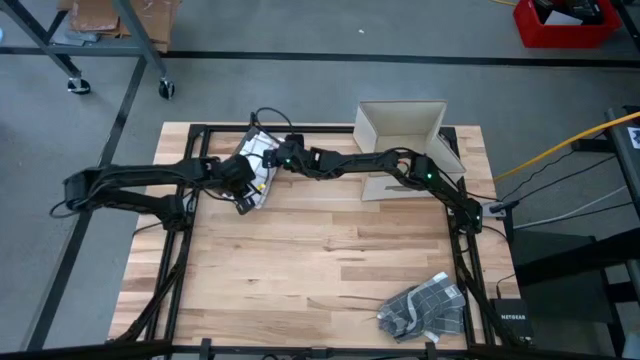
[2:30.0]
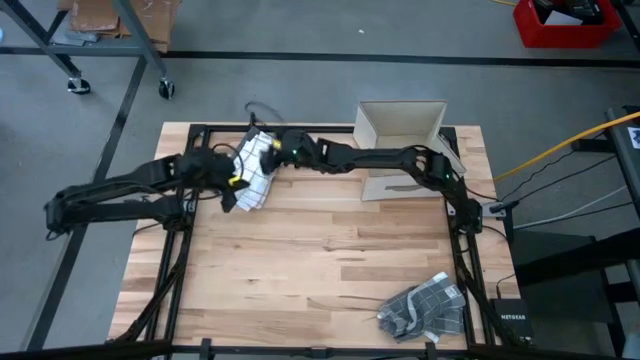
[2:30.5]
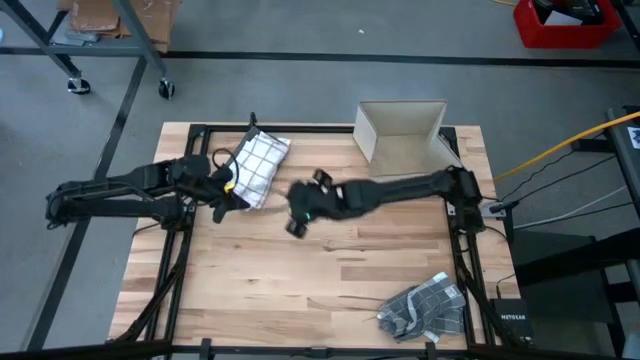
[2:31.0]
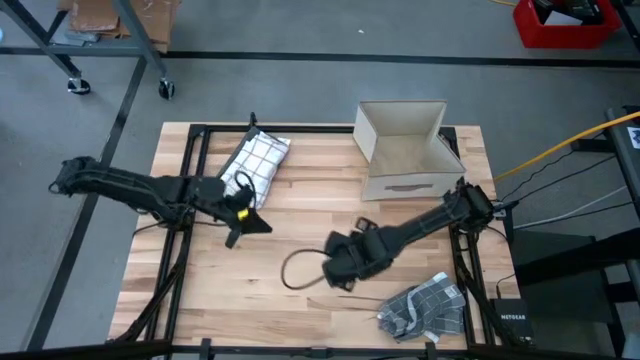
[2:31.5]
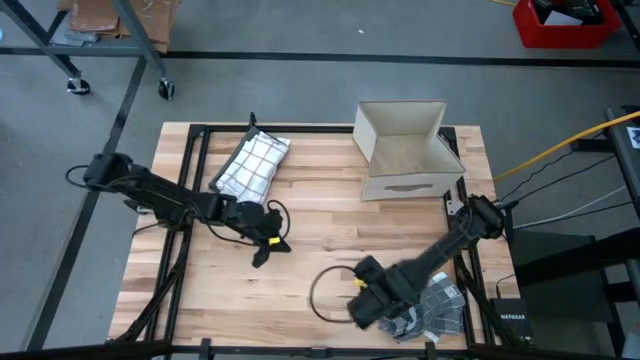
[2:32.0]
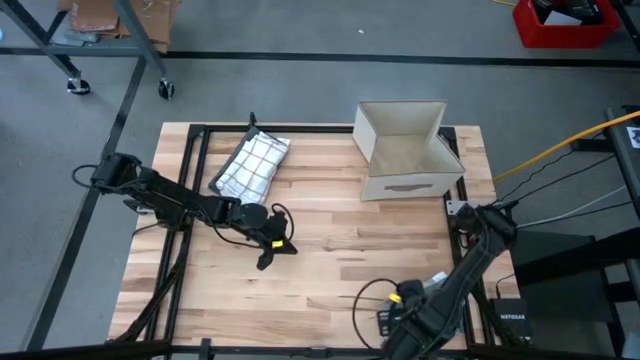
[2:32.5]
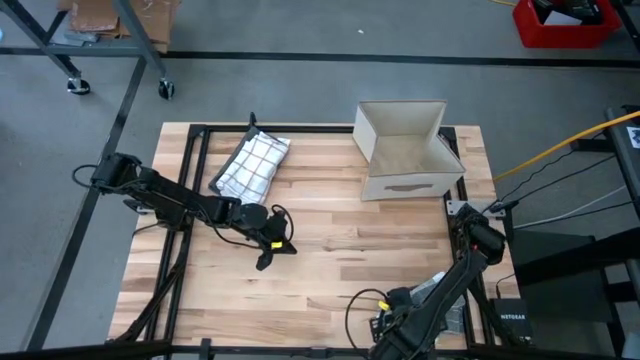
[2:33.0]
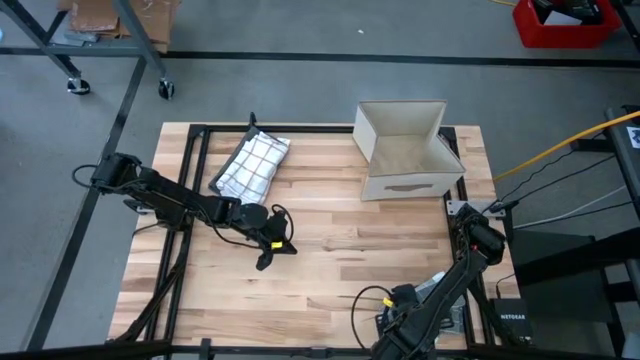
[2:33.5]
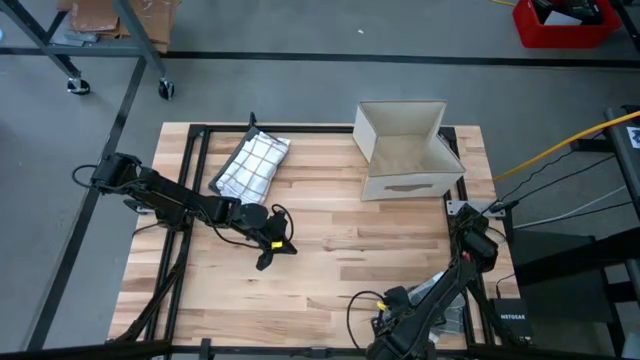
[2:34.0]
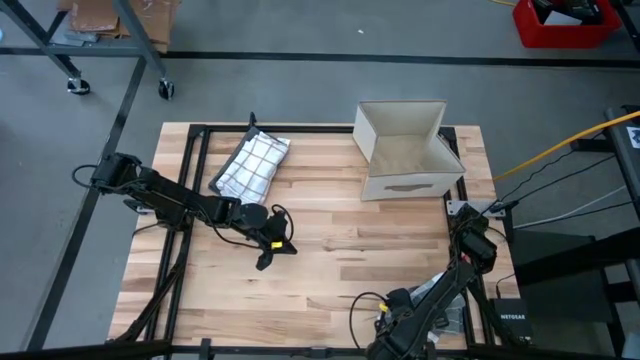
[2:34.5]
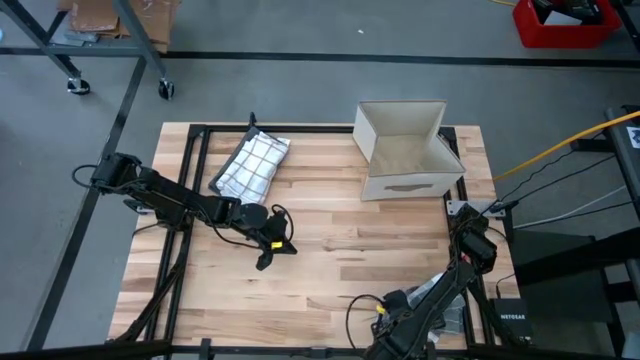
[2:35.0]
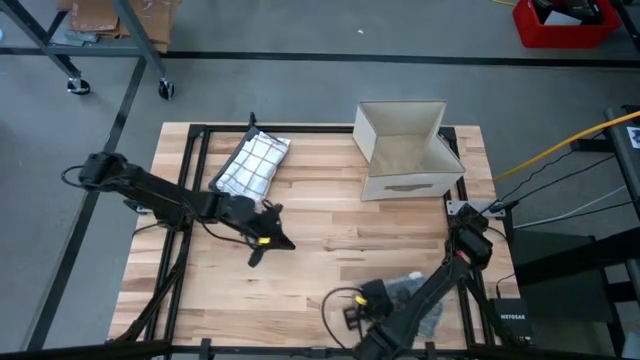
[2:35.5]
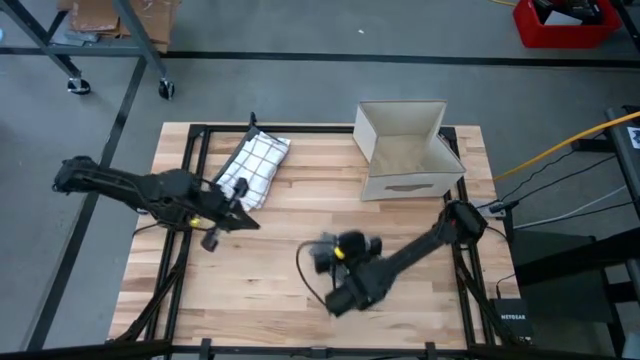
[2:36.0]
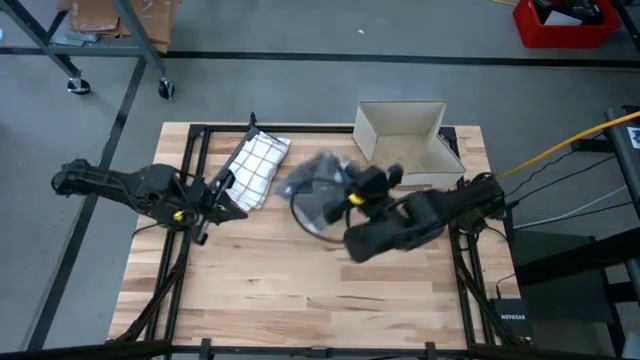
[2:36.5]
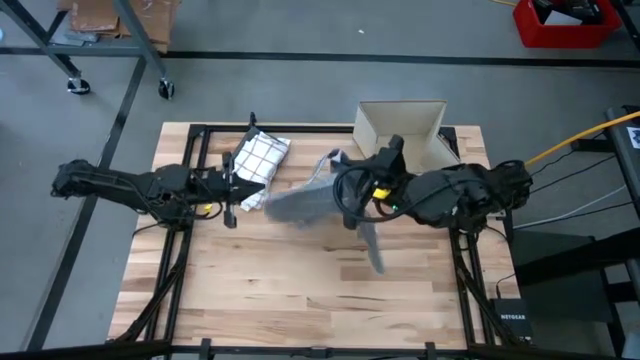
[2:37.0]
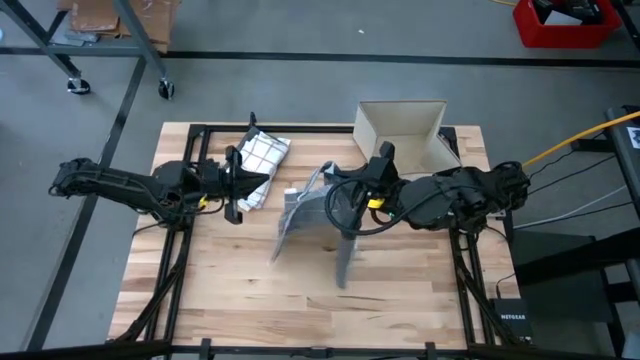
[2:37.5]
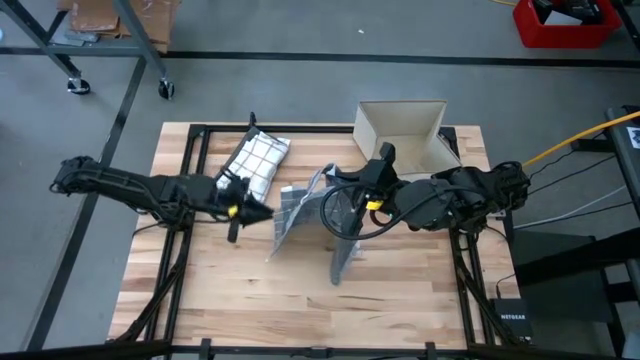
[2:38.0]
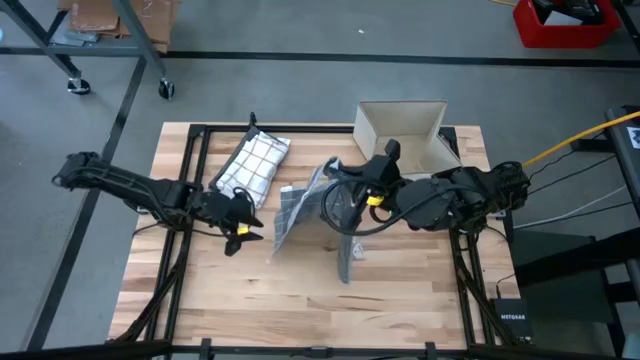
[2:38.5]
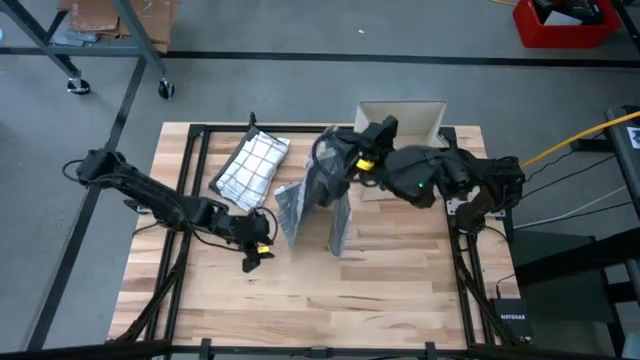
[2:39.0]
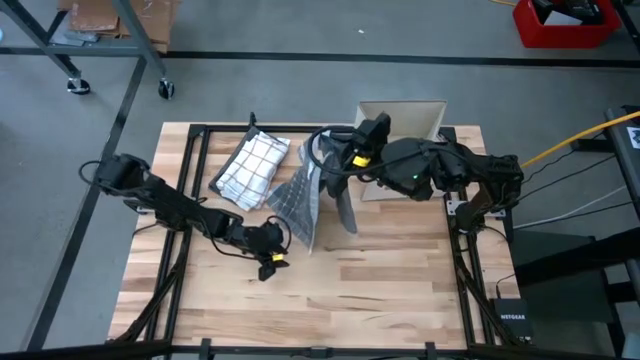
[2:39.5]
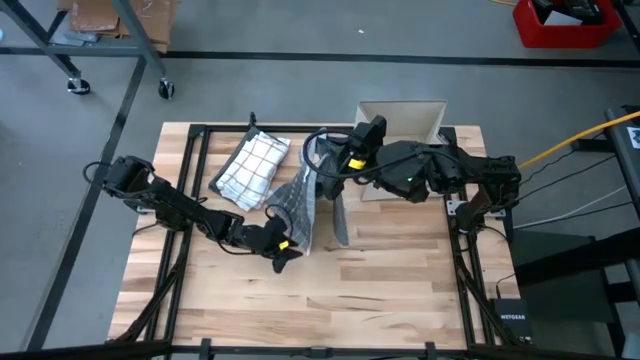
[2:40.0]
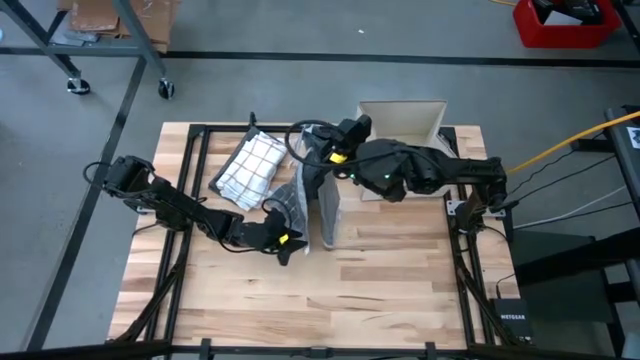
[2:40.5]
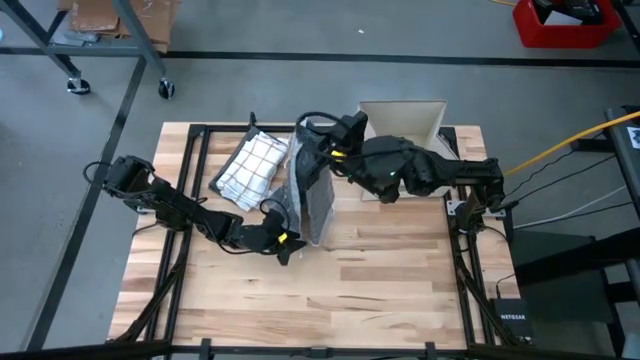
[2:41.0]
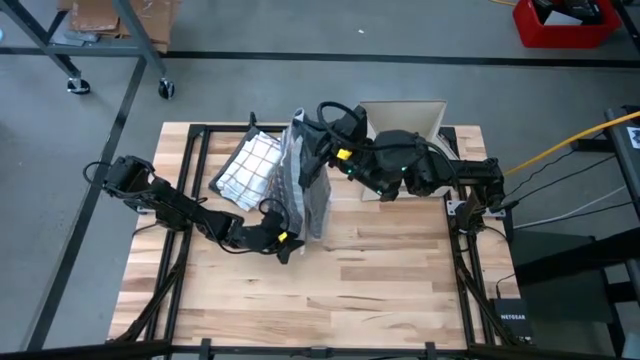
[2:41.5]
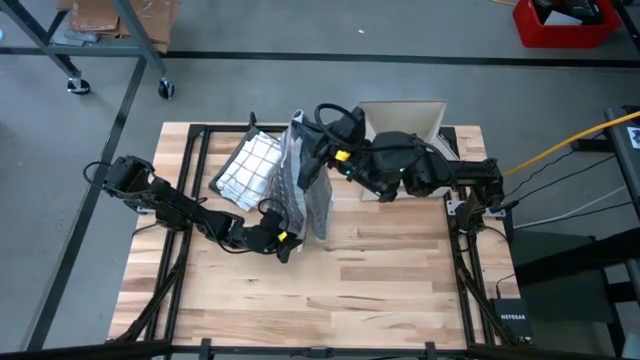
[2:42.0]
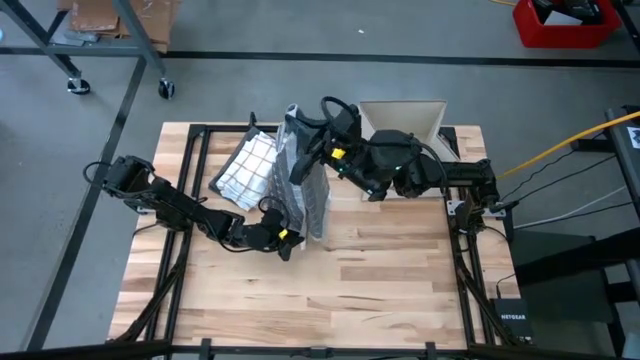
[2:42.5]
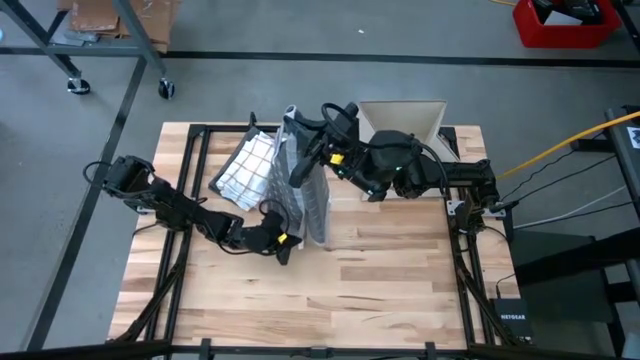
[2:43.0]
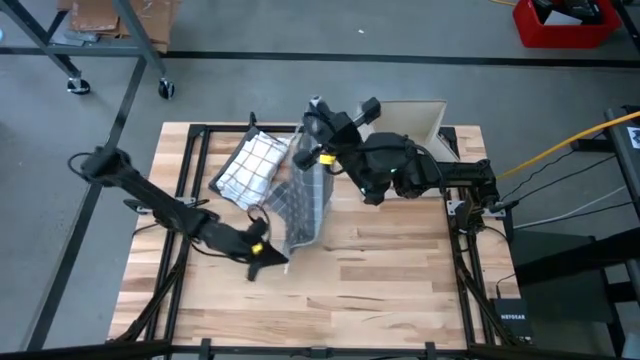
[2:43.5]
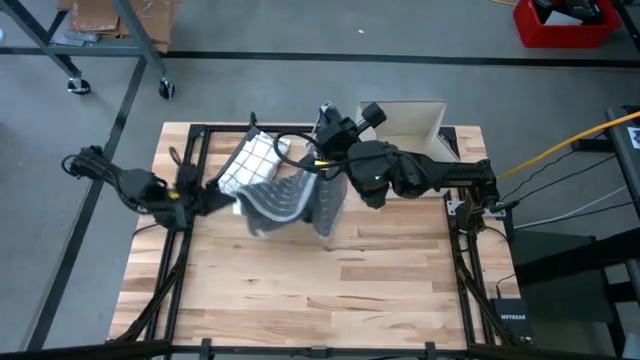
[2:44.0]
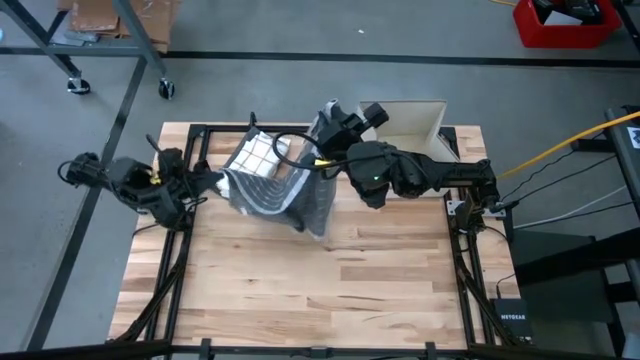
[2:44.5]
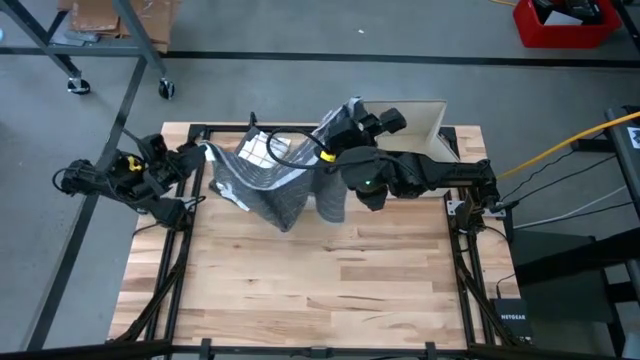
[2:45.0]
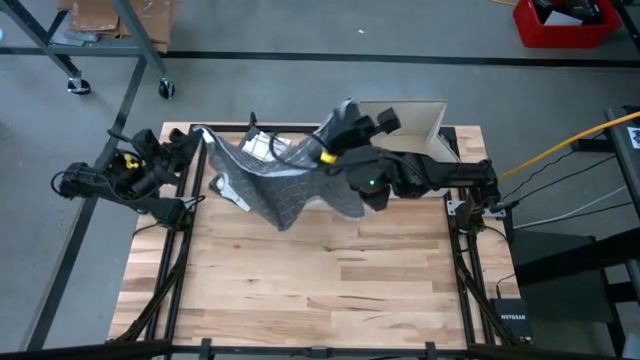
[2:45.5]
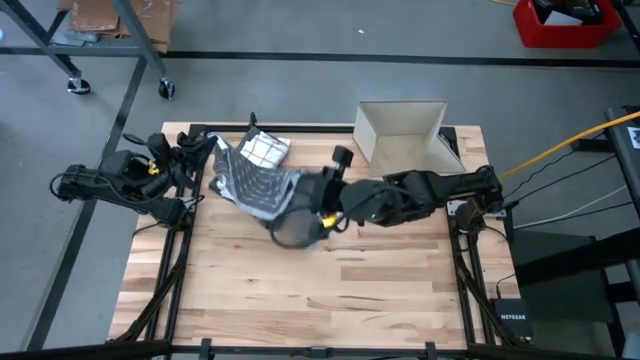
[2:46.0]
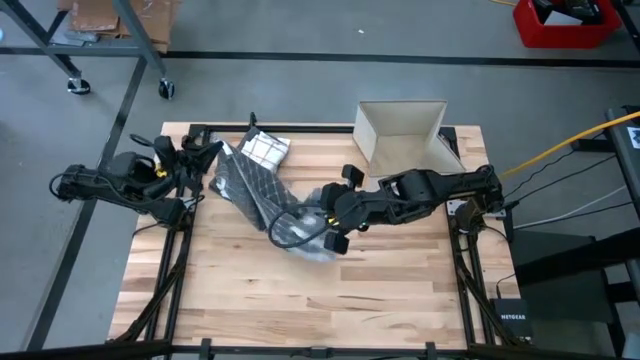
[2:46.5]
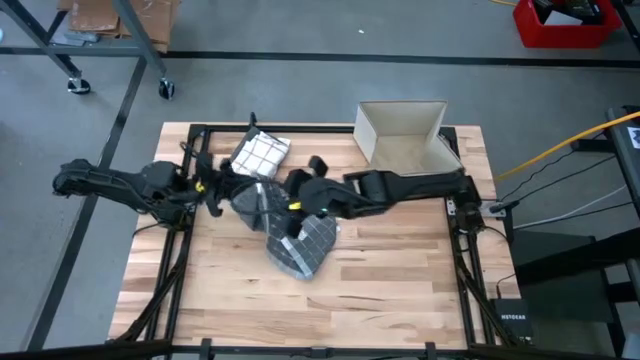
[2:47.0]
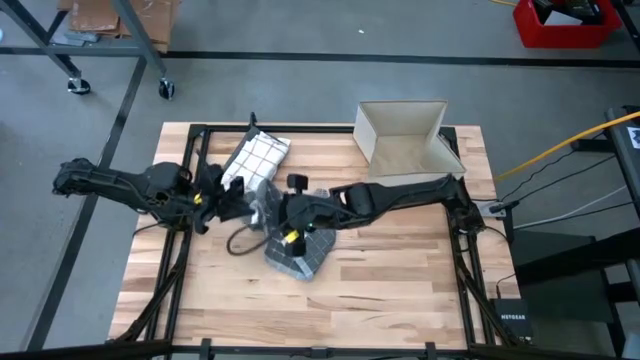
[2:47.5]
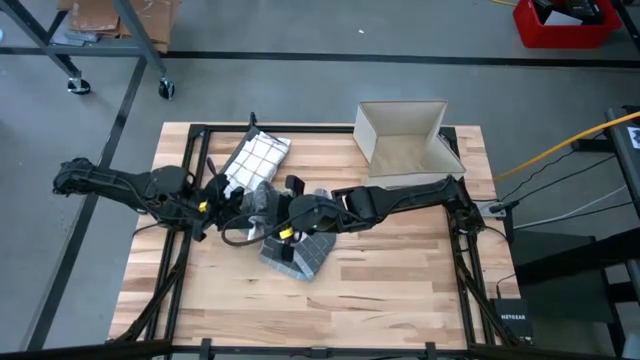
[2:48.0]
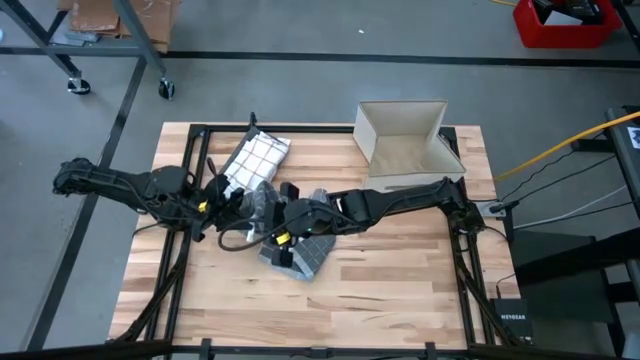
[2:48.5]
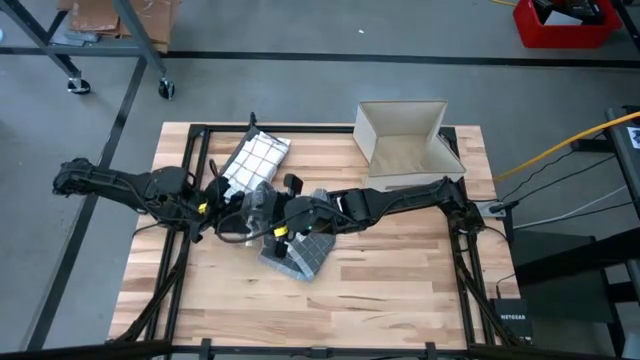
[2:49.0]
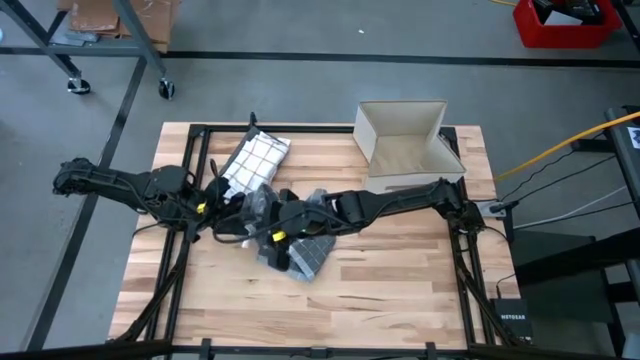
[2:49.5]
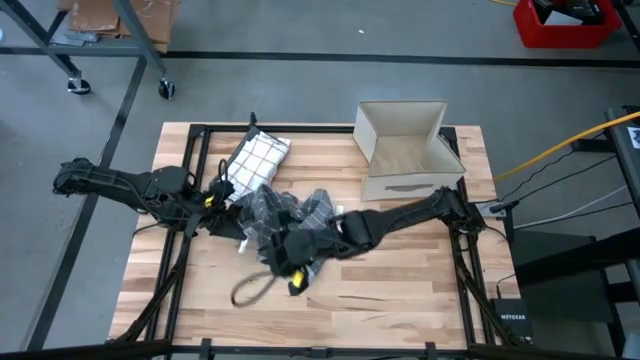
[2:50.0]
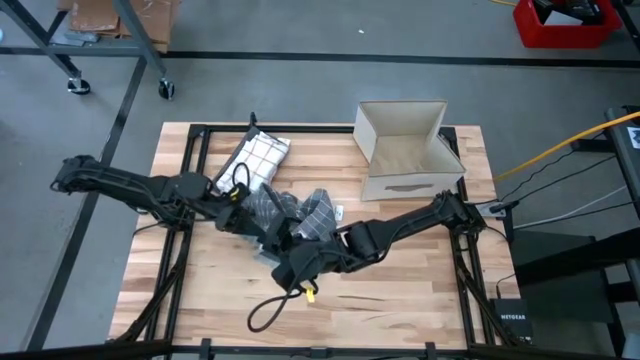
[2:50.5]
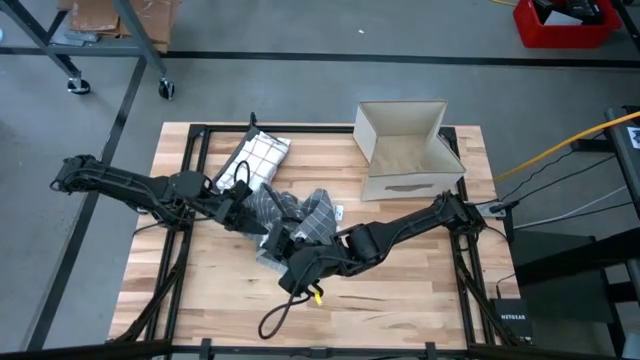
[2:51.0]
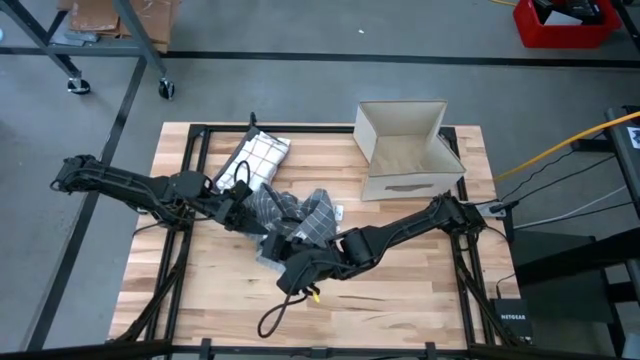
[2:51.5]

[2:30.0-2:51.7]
Task: Fold towel
Fold the gray white kitchen towel
